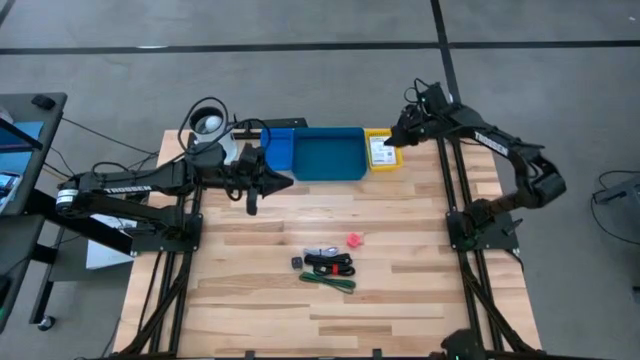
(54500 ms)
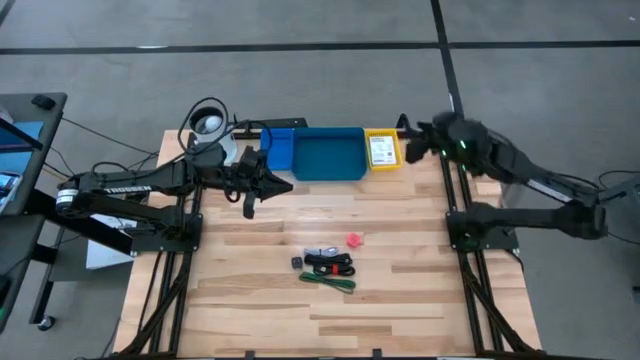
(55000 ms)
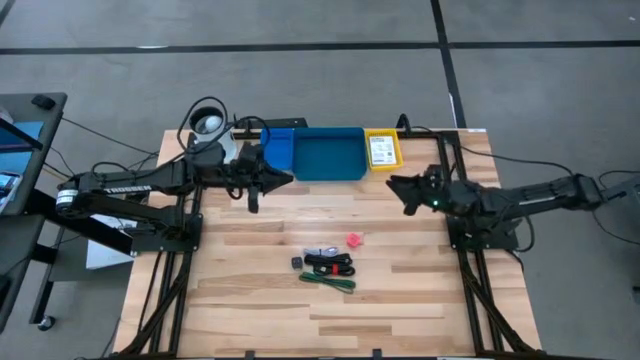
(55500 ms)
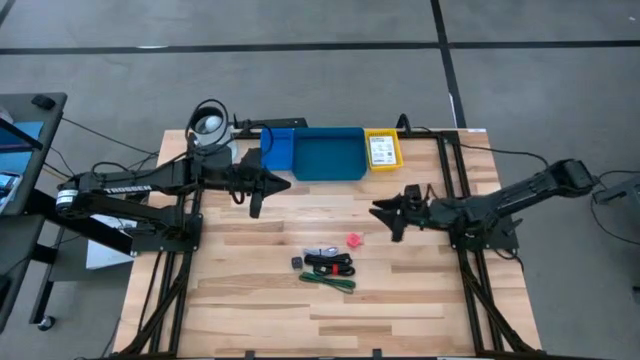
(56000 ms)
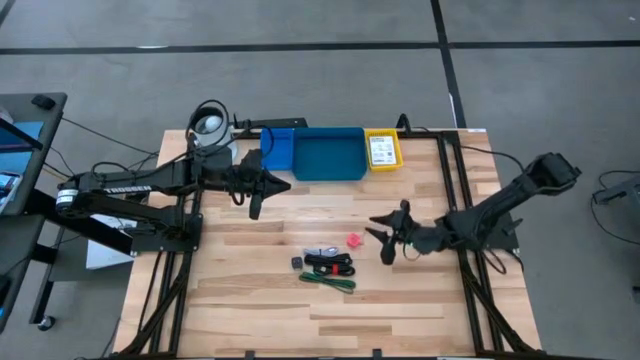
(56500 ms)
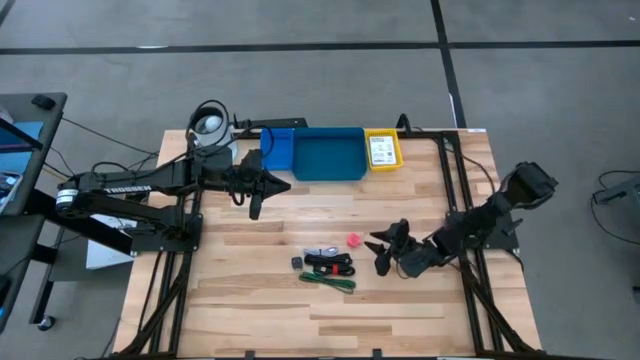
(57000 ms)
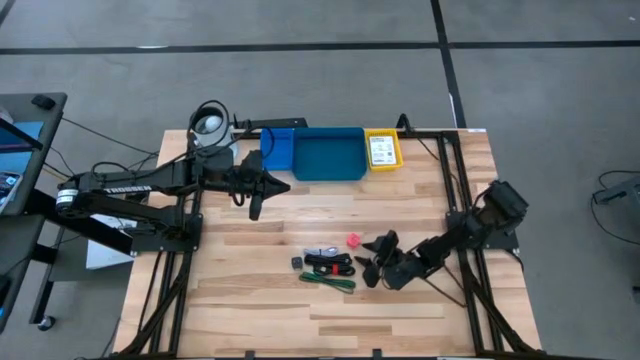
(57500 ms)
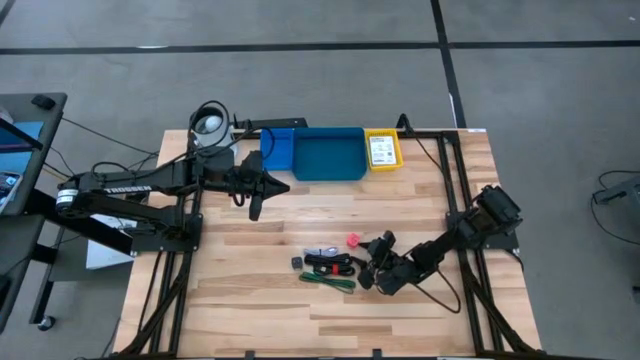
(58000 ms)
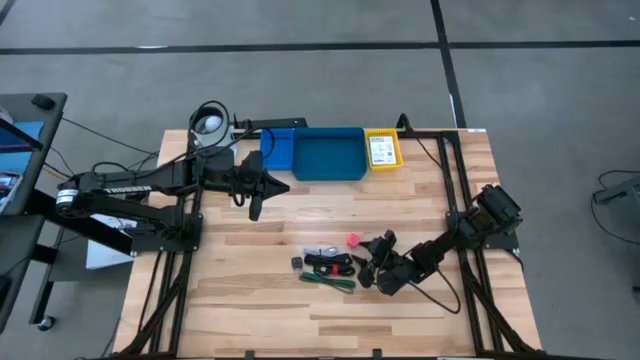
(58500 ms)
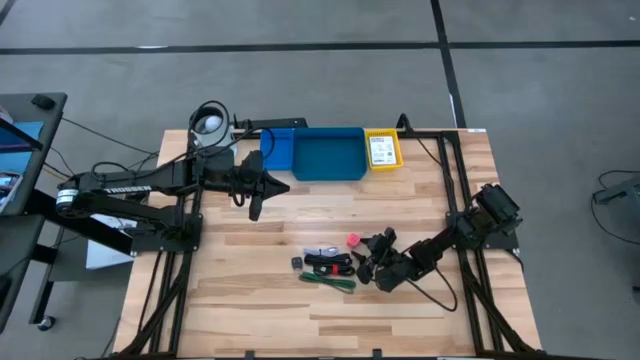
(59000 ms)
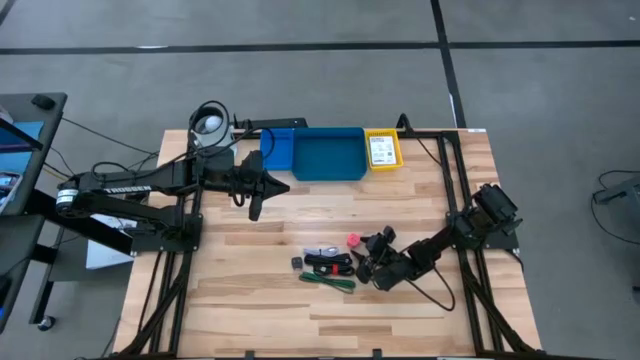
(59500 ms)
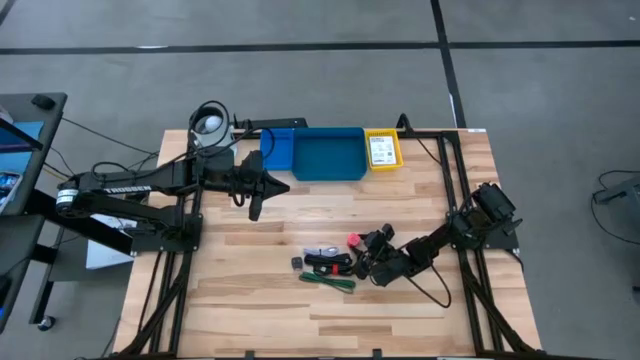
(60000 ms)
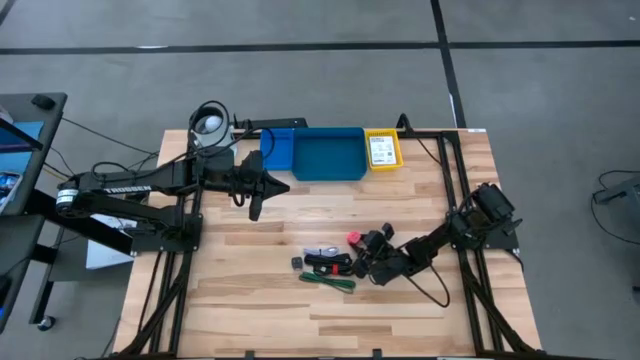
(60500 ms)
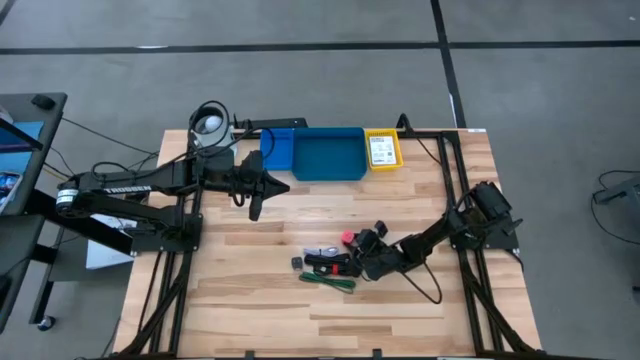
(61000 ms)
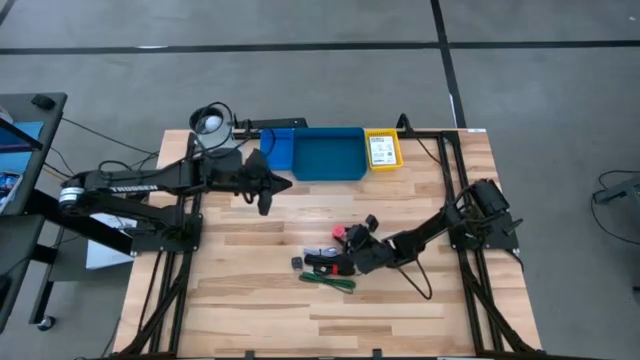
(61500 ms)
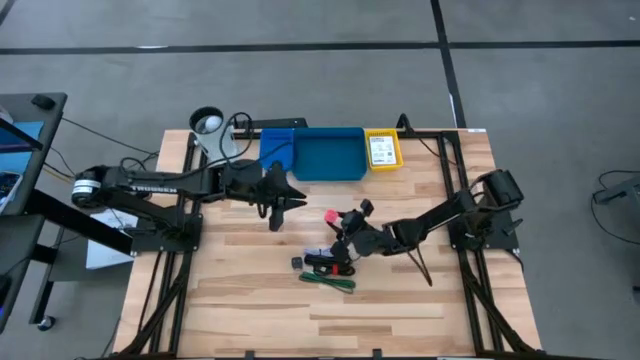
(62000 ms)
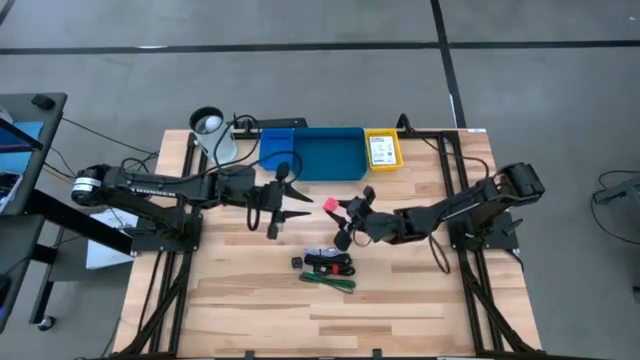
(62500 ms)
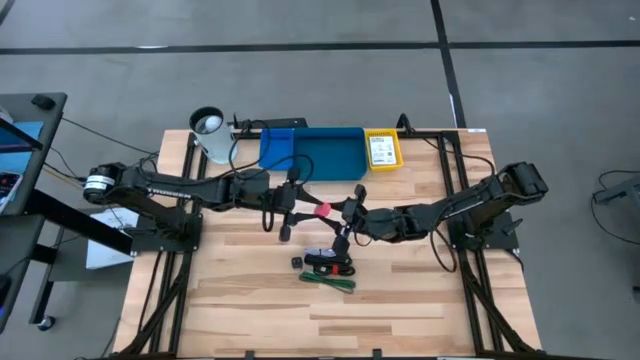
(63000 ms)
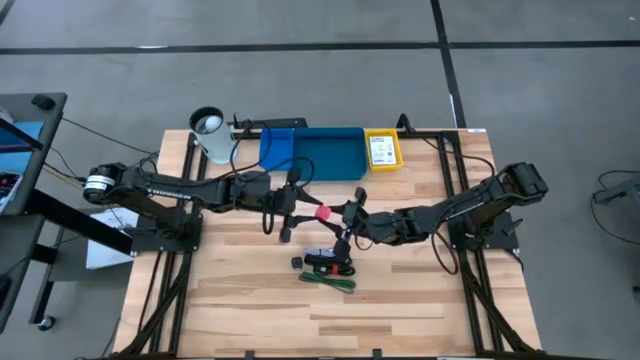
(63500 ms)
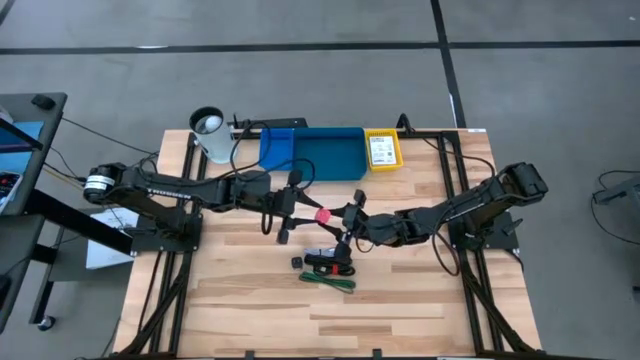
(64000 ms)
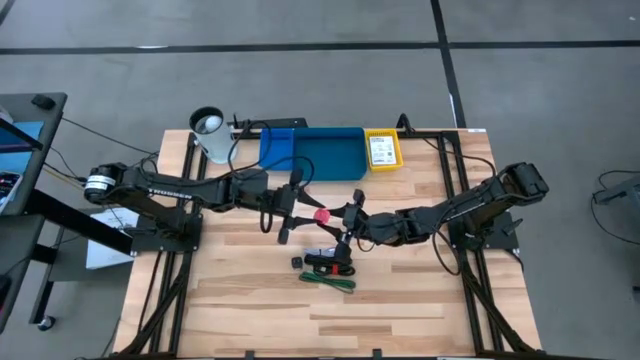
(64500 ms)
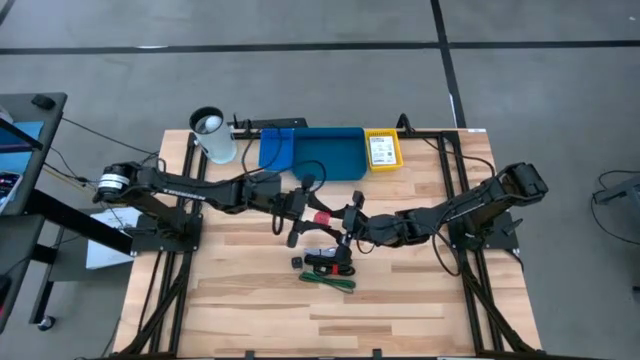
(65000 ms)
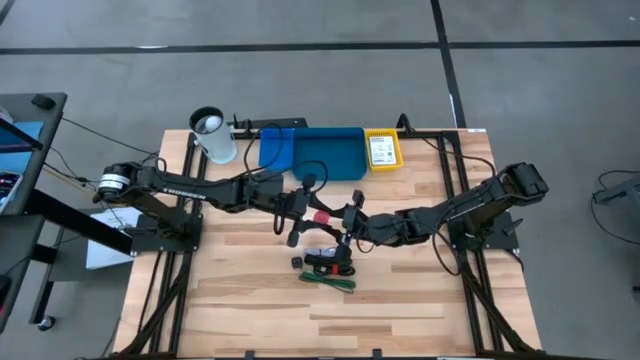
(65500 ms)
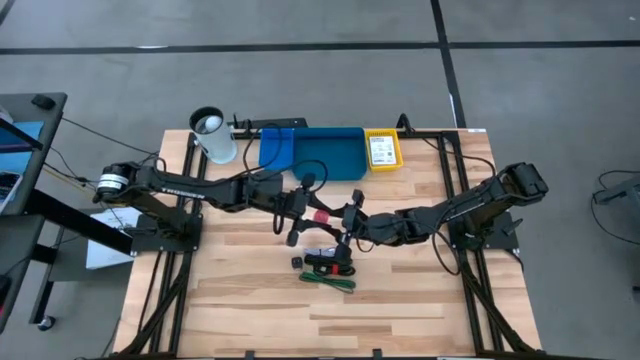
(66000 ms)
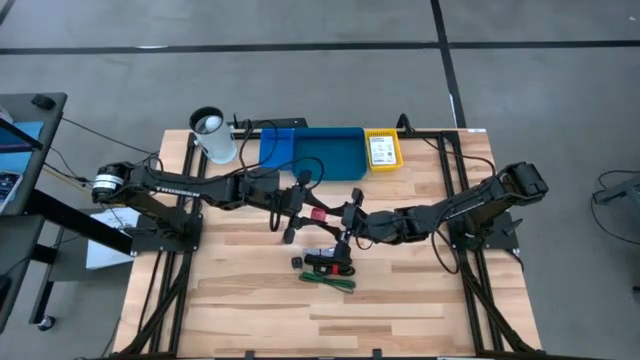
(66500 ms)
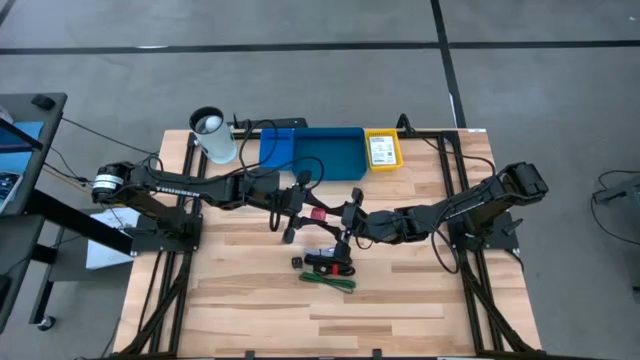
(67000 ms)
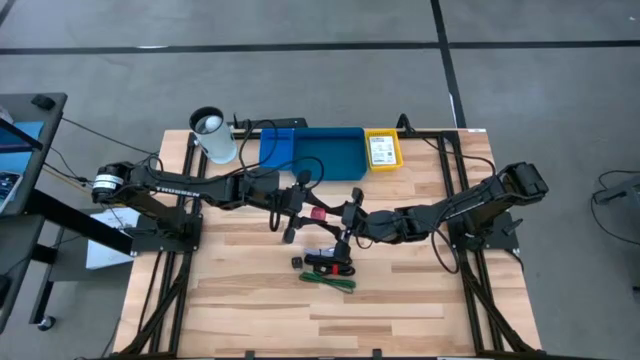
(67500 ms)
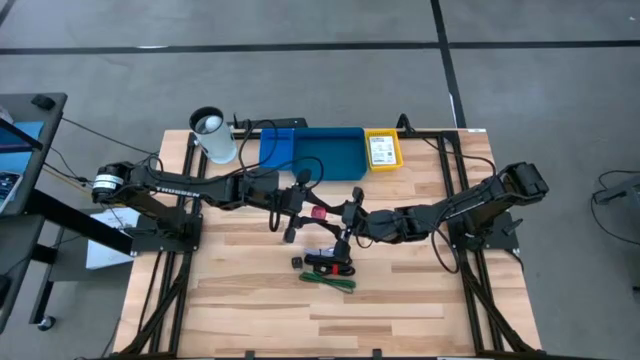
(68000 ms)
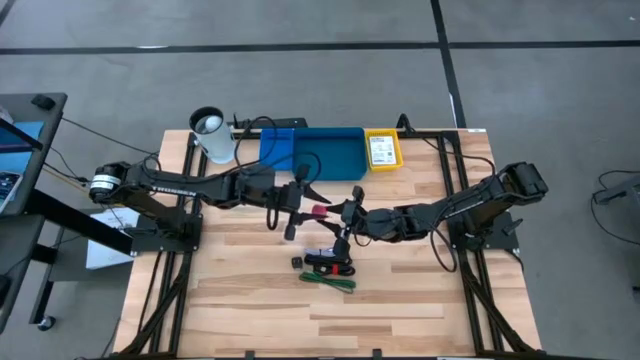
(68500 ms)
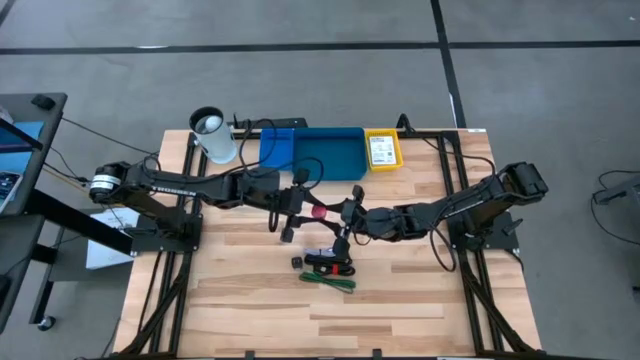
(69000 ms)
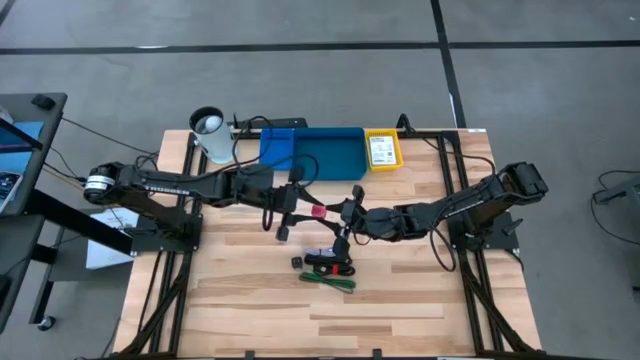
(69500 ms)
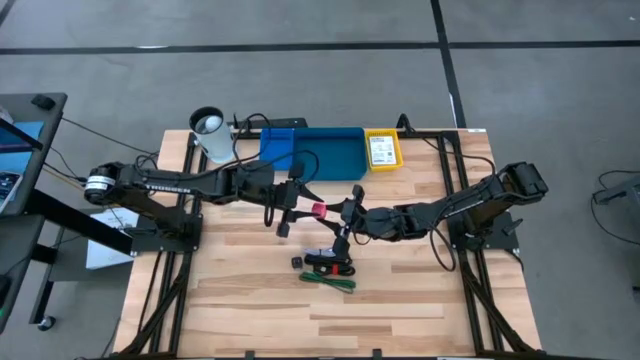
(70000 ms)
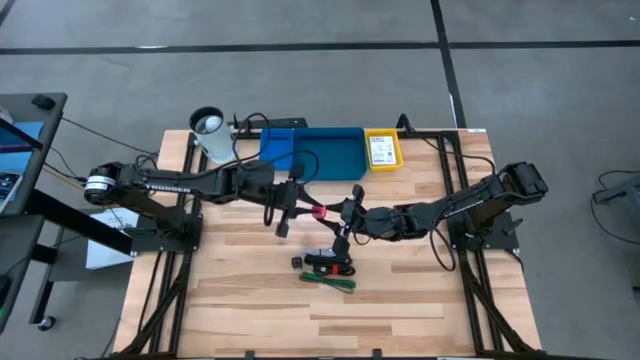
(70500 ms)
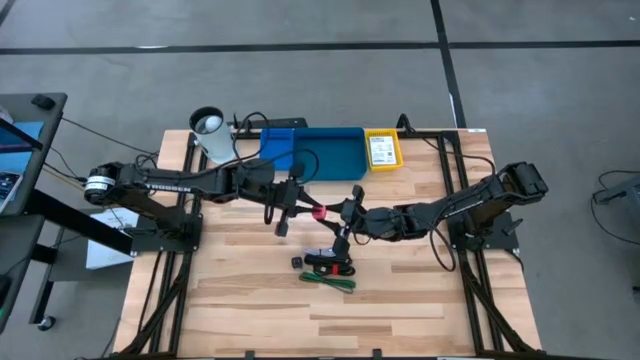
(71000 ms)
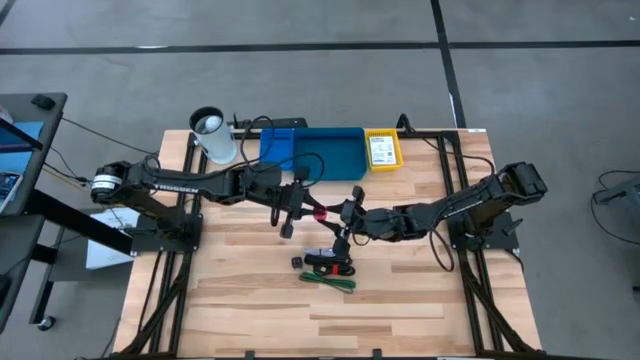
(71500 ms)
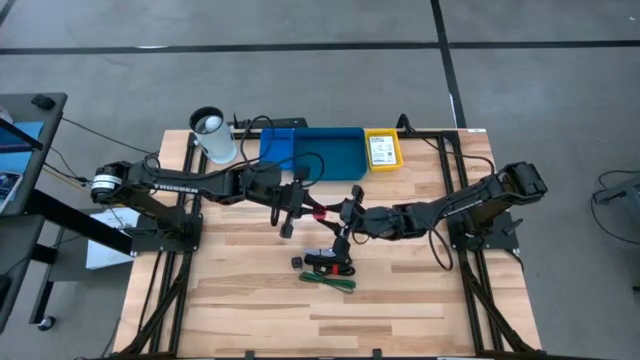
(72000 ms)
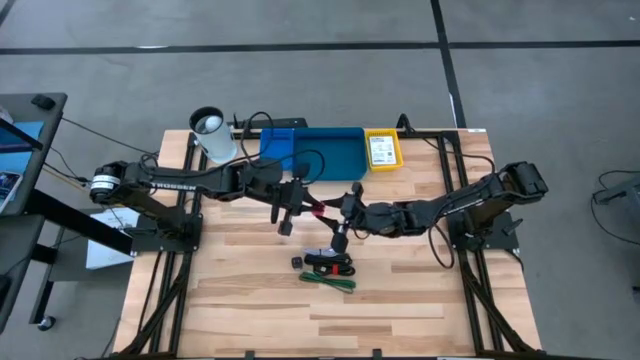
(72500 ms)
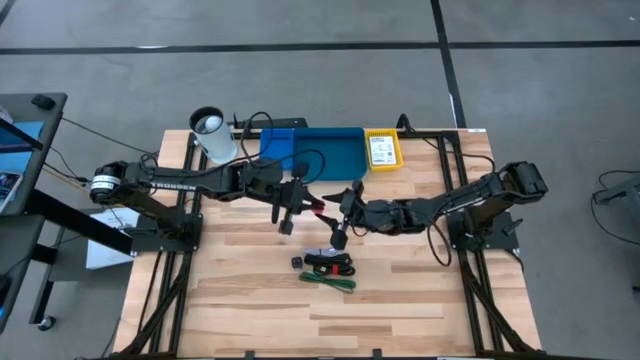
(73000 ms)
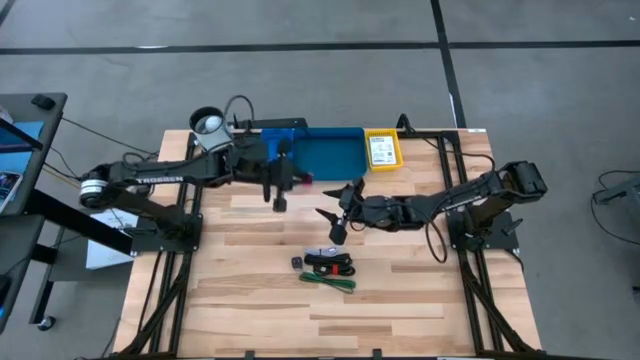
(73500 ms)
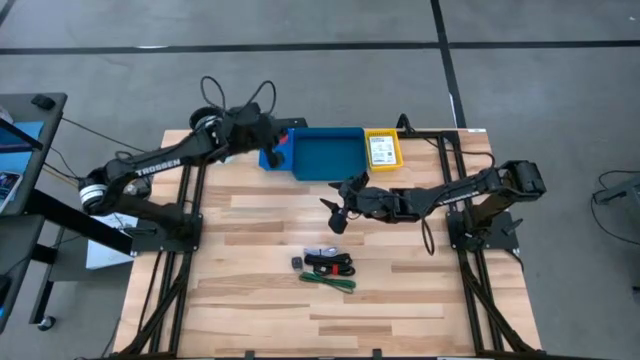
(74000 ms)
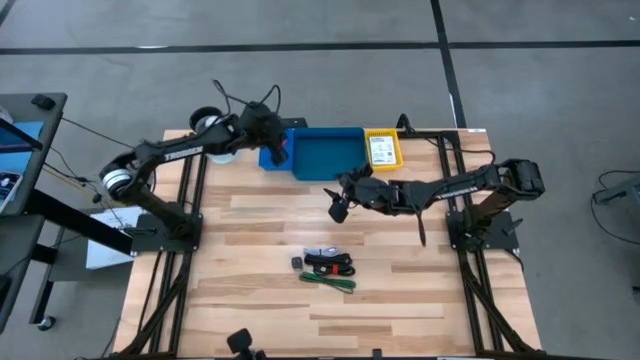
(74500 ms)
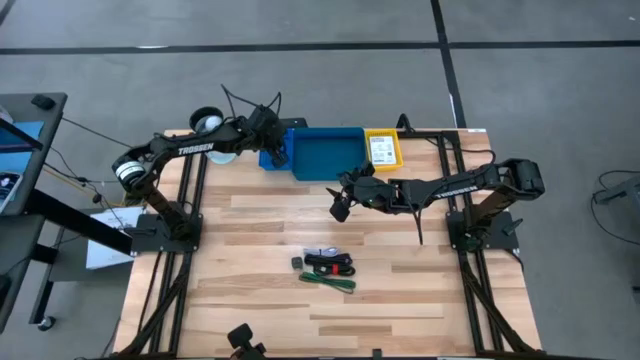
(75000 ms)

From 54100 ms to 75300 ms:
Task: Pick and place items into bin
Put the pink charger adapter into the blue bin
